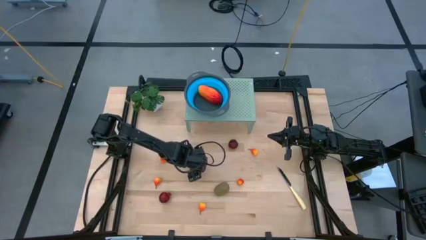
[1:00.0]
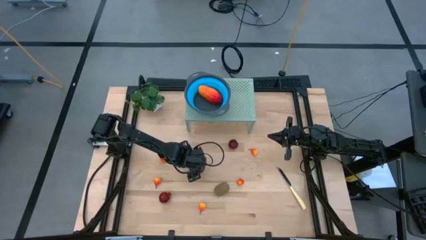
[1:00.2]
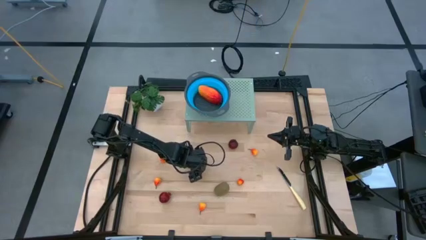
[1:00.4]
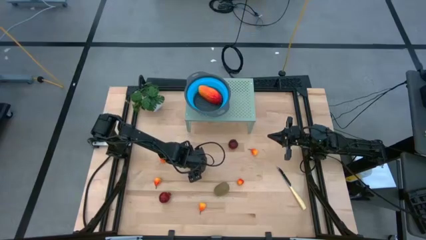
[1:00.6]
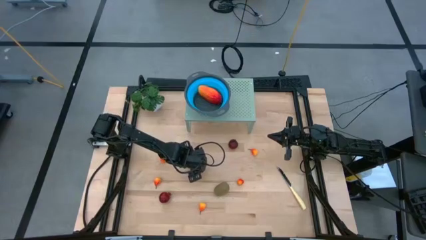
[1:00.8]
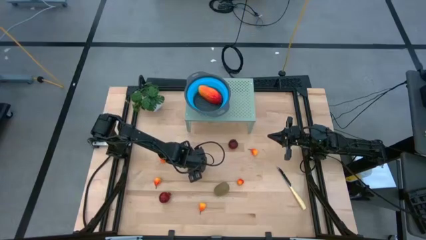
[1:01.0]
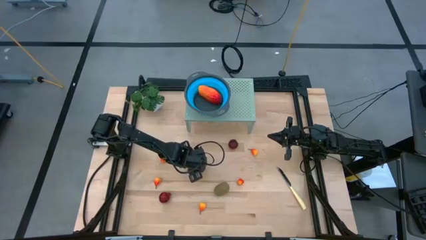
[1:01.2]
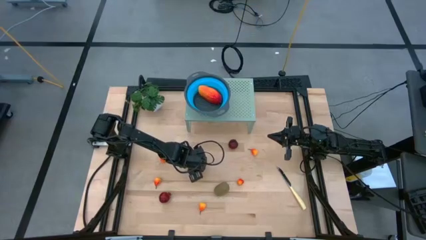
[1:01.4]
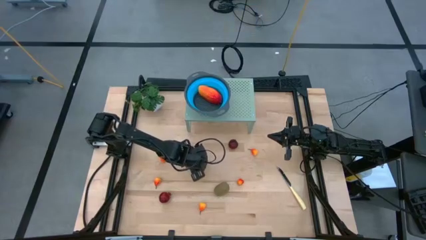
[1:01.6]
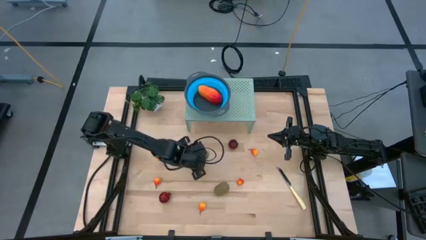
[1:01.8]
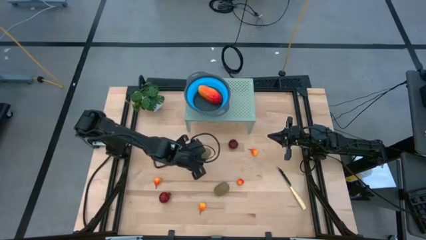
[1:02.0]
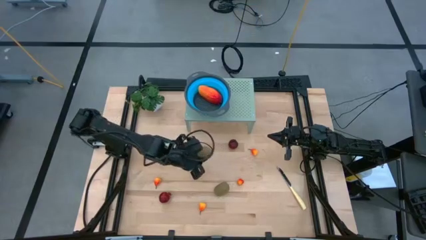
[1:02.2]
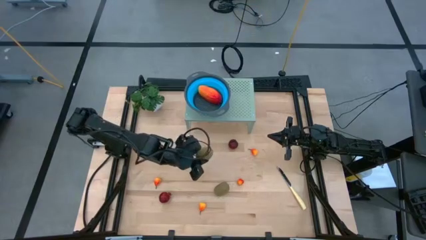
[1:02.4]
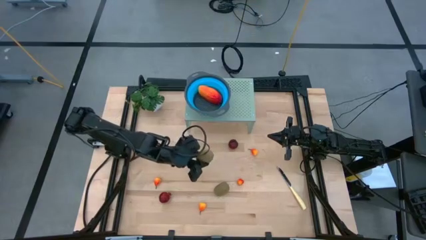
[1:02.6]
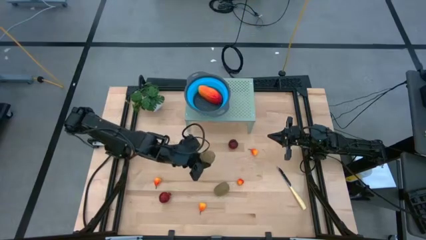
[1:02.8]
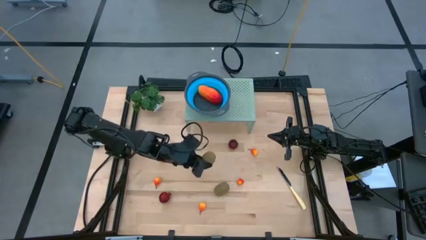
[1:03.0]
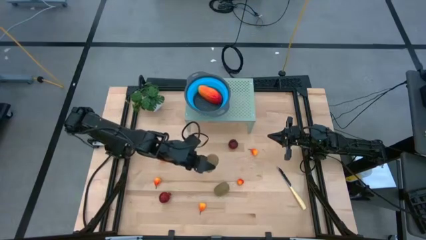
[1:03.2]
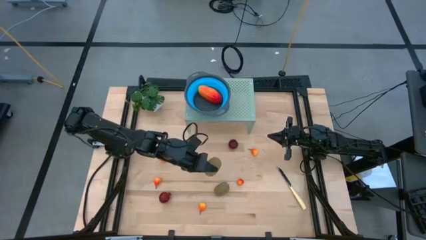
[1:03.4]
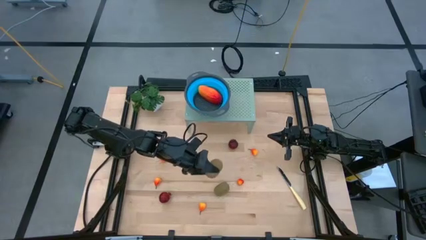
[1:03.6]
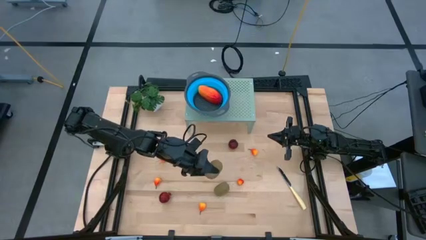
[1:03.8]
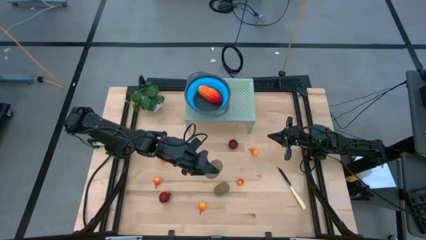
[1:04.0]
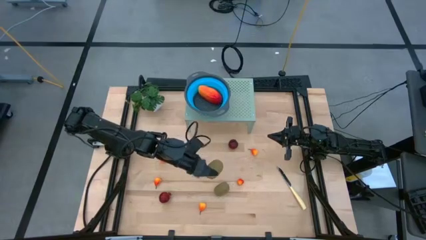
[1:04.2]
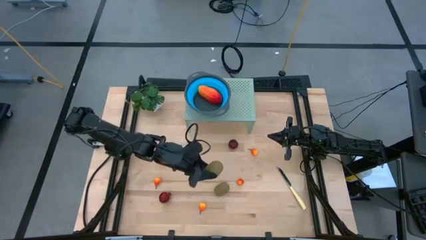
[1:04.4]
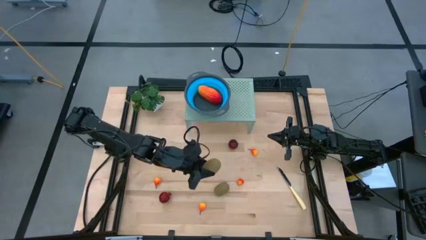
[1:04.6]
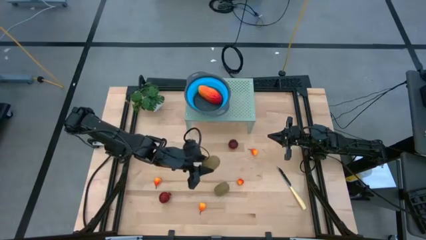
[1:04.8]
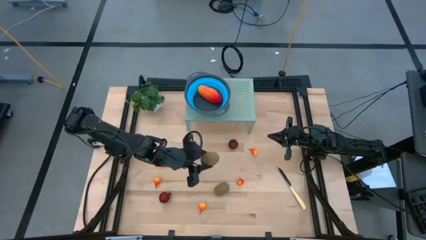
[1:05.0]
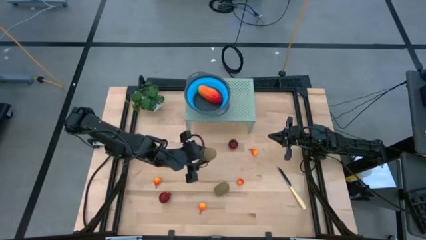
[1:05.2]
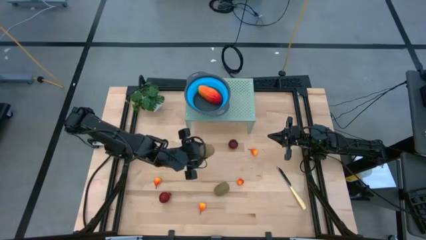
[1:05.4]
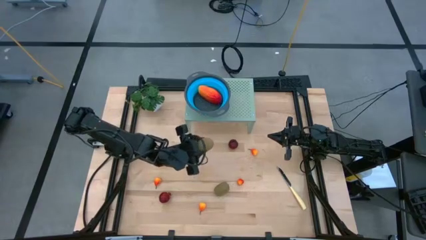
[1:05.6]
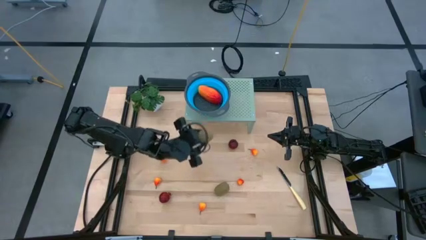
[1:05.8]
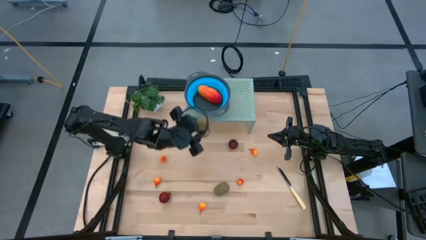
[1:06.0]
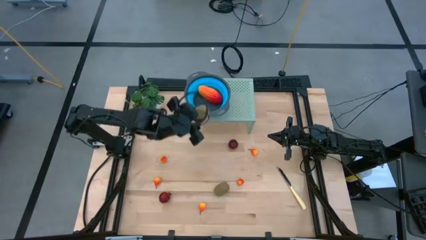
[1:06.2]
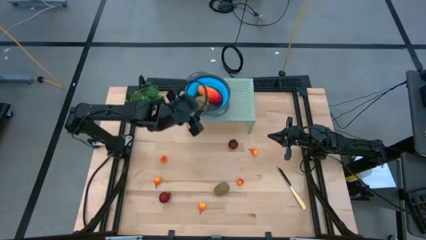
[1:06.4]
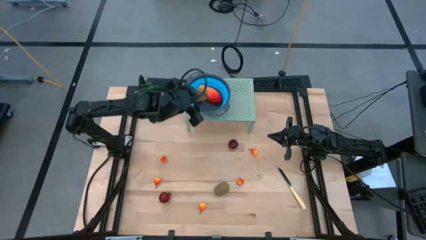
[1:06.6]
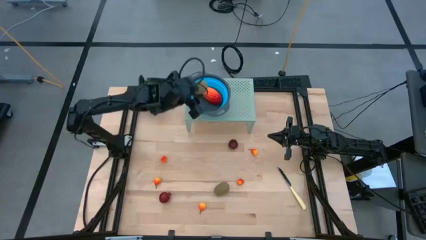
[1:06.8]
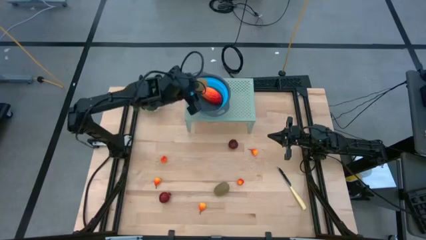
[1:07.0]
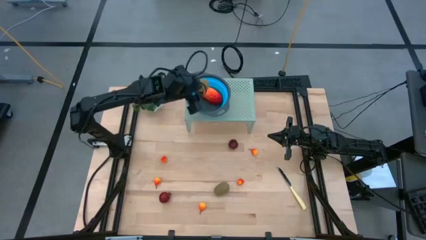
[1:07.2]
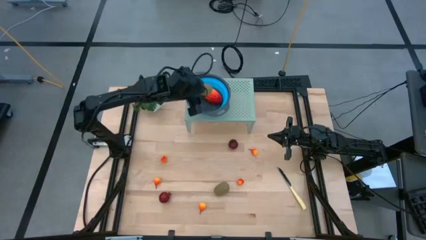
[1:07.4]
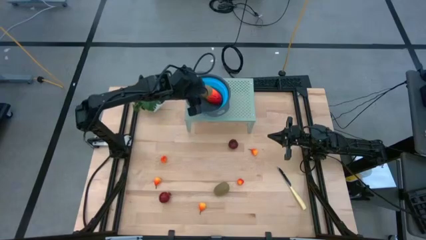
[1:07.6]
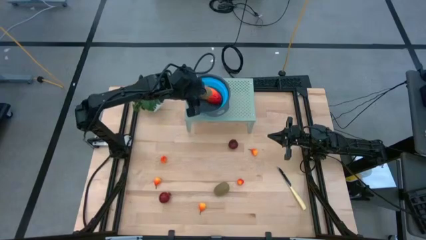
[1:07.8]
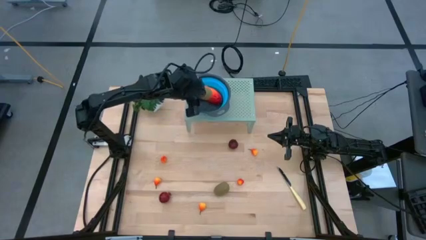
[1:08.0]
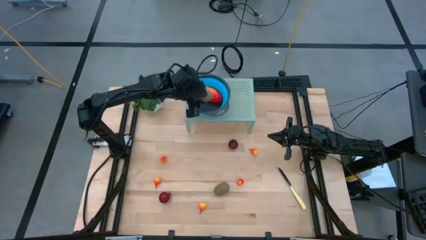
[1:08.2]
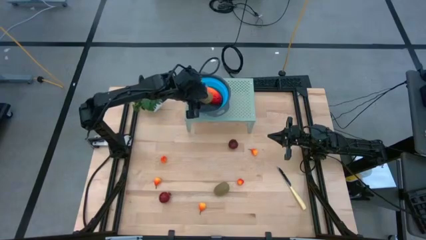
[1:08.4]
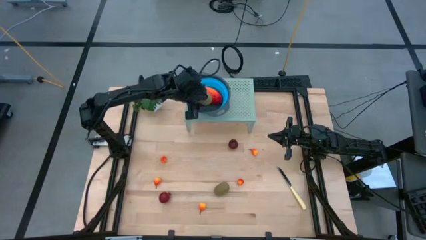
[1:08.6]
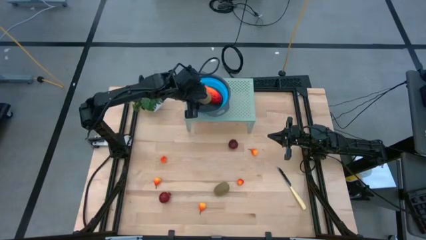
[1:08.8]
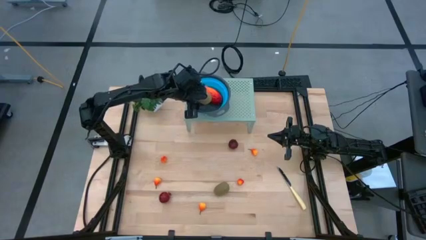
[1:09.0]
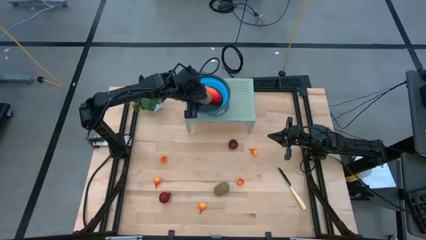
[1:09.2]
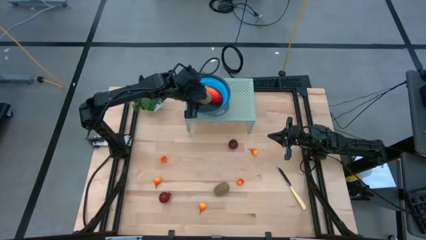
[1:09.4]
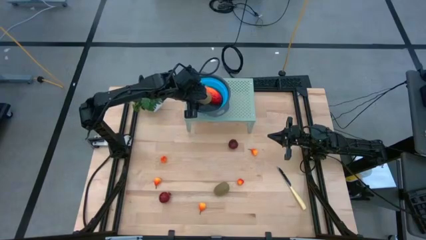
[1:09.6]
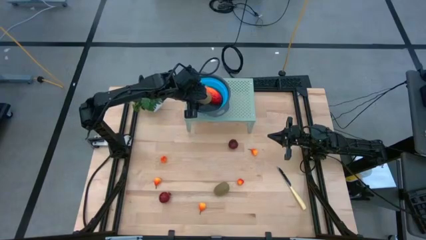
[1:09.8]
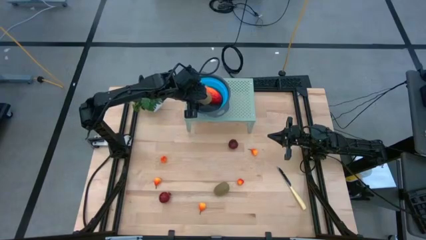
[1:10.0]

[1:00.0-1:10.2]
Task: Pick & Place Fruit
Put the brown kiwi into the blue bowl on the shelf
